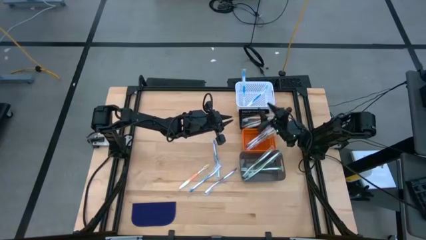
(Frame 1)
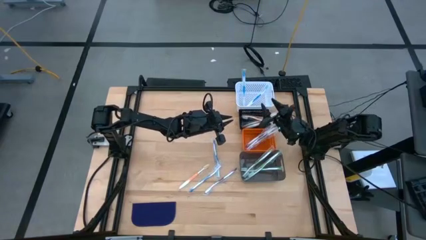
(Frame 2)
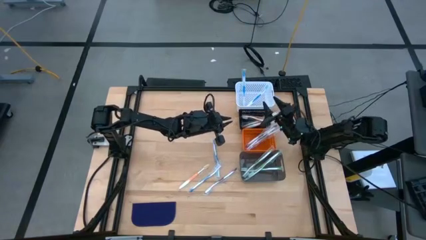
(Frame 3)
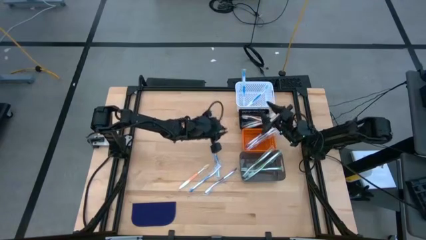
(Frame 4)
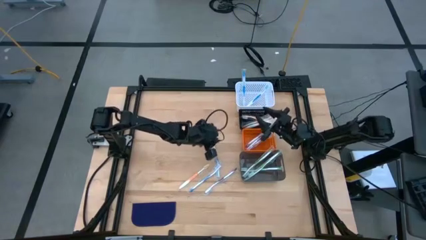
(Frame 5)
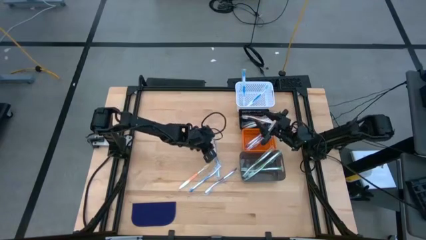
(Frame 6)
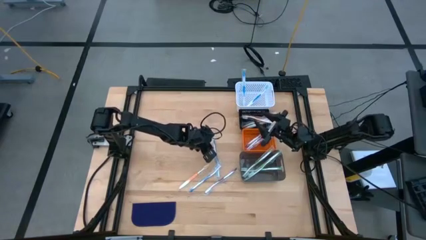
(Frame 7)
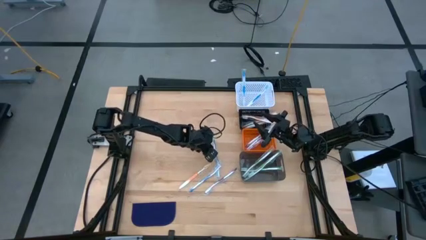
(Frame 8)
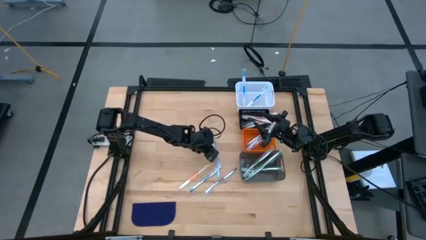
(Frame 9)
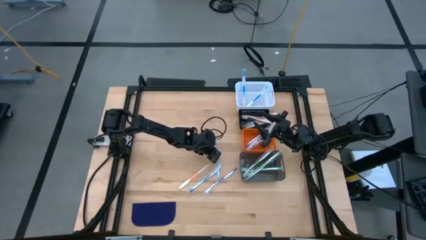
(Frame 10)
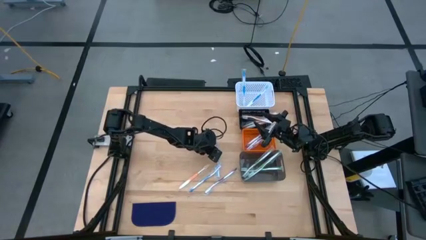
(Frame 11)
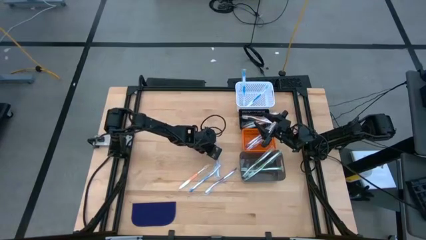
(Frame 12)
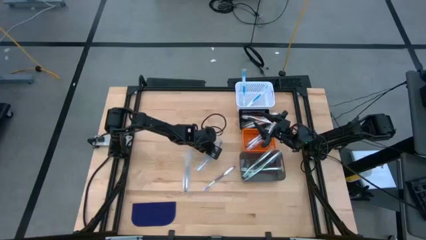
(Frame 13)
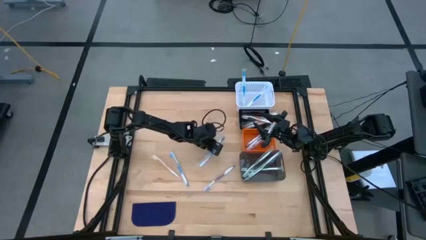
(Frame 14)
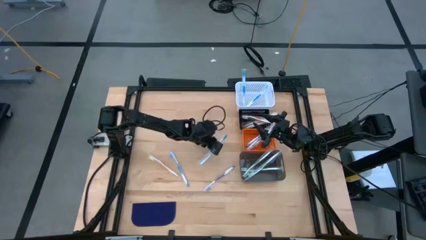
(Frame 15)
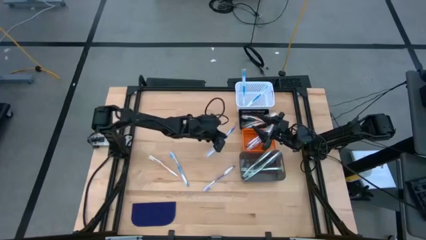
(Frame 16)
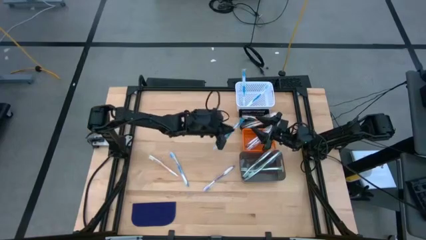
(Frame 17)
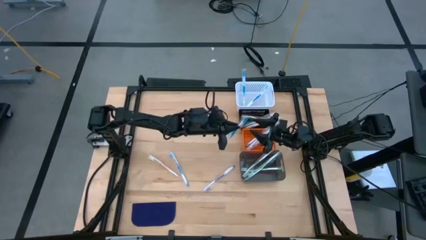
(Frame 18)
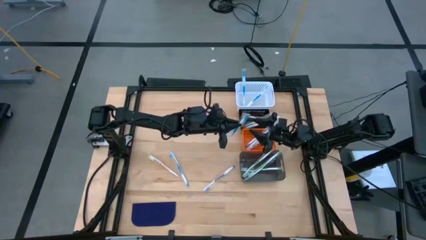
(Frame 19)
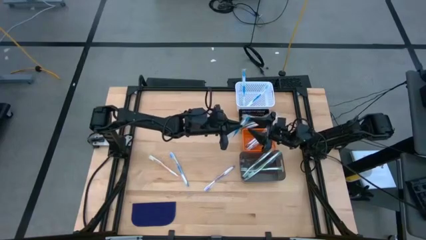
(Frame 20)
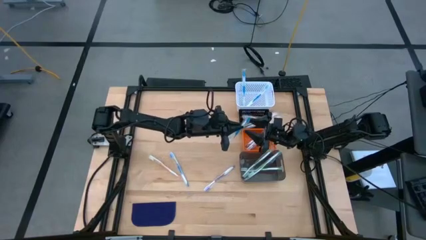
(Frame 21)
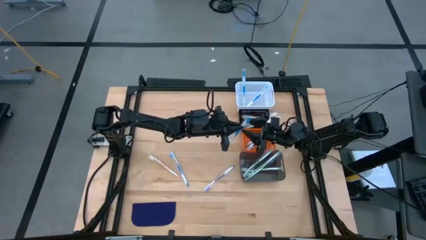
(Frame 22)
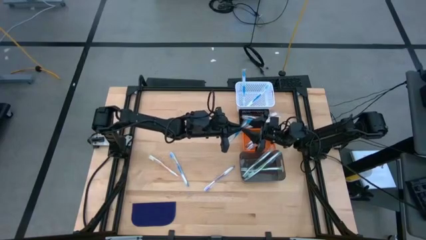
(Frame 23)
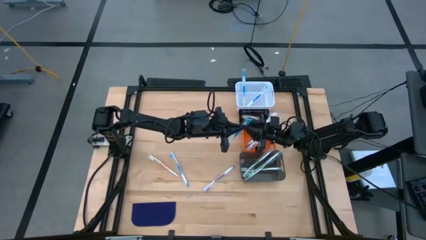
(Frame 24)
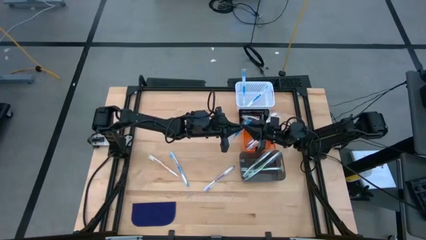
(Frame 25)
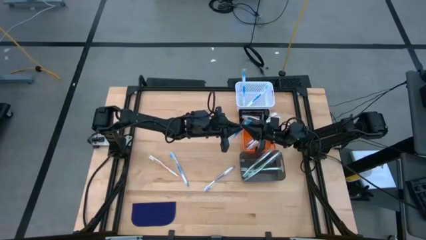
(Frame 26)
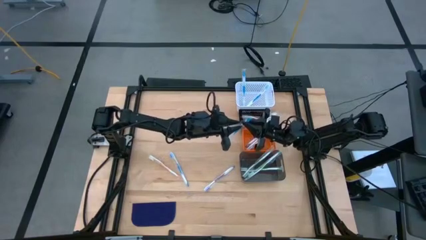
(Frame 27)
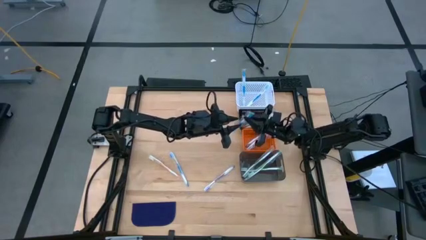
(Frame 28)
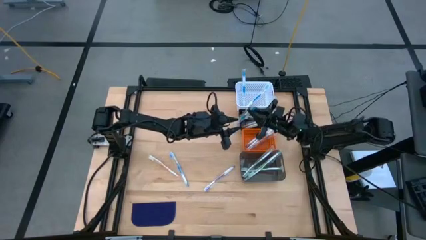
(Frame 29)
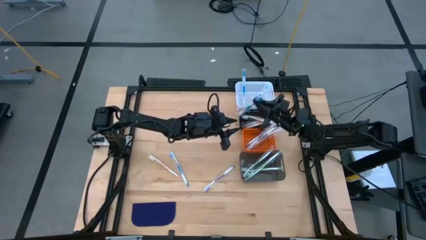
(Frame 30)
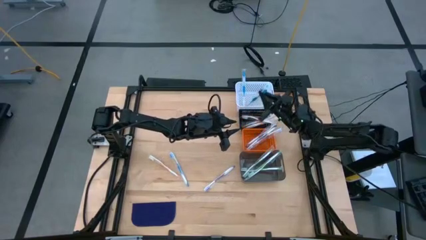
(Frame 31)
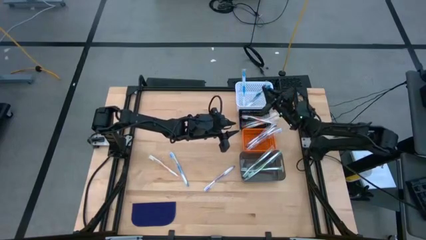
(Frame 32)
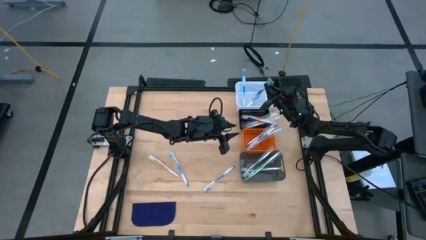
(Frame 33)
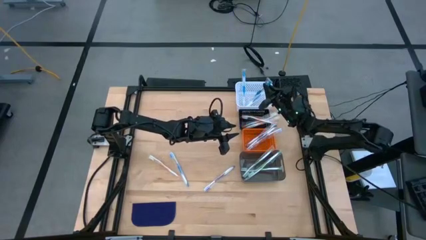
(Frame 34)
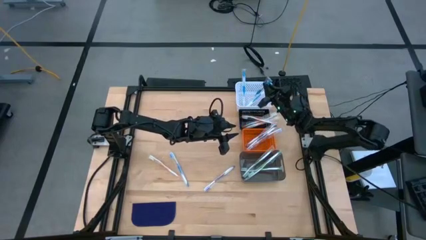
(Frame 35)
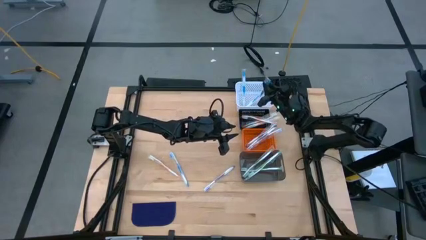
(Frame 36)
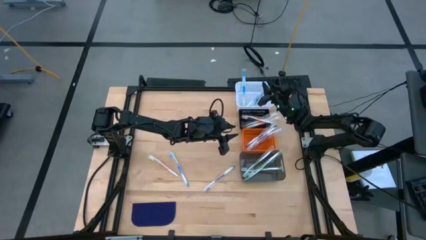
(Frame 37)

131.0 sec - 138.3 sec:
Task: Pick & Place Toothbrushes
Put the blue toothbrush into the white bin

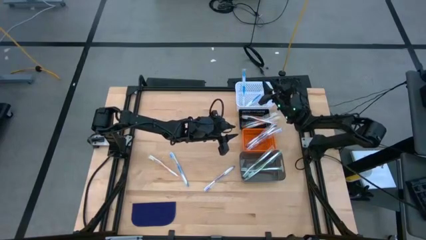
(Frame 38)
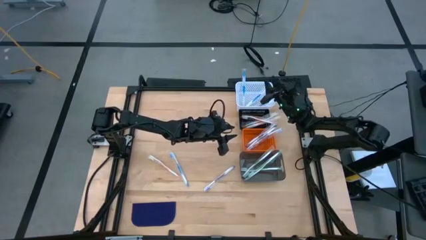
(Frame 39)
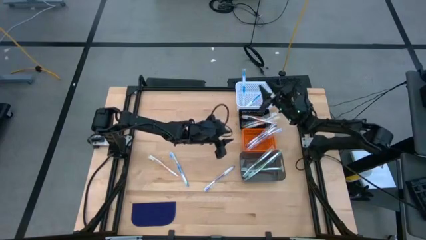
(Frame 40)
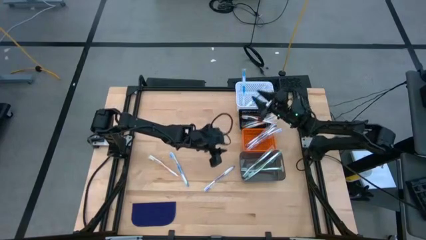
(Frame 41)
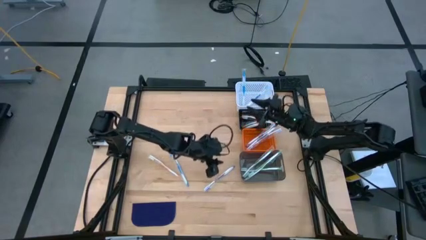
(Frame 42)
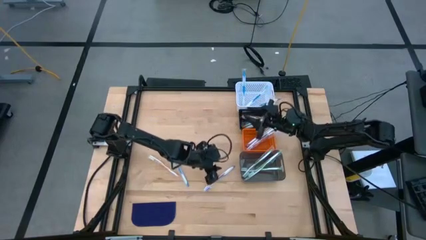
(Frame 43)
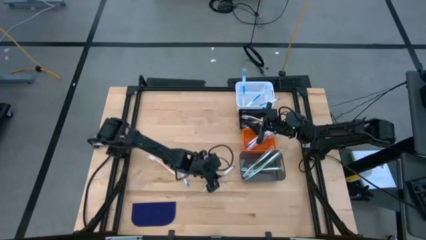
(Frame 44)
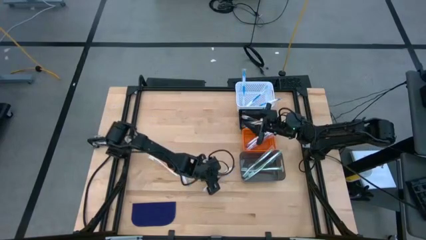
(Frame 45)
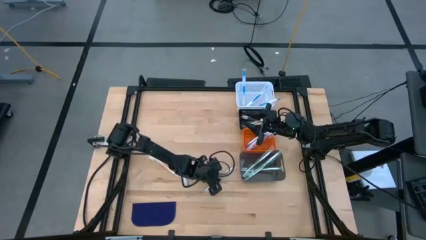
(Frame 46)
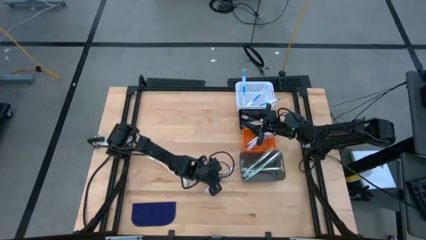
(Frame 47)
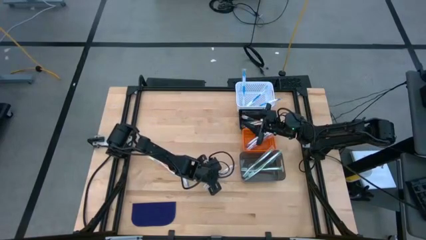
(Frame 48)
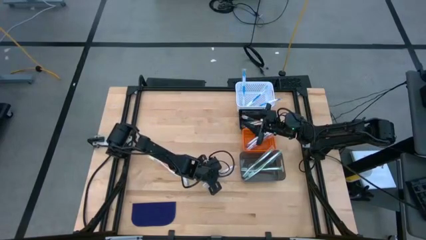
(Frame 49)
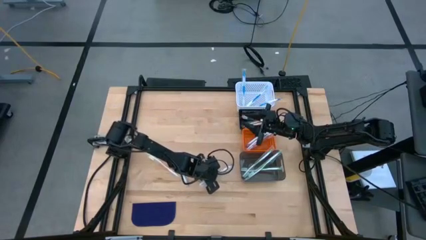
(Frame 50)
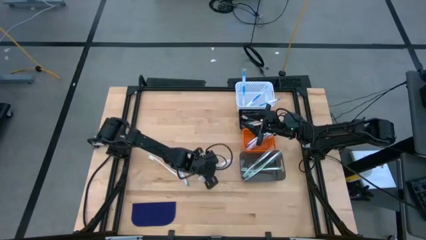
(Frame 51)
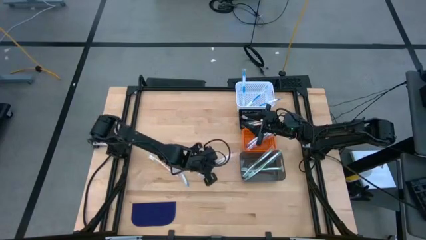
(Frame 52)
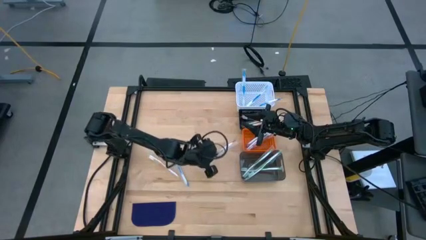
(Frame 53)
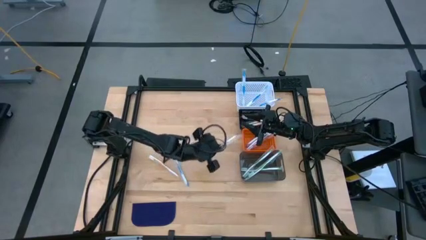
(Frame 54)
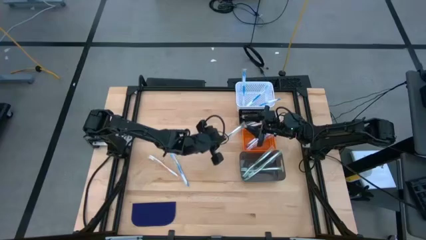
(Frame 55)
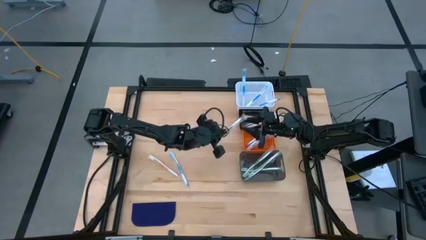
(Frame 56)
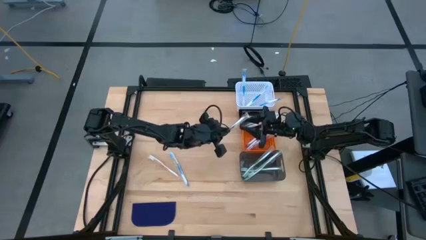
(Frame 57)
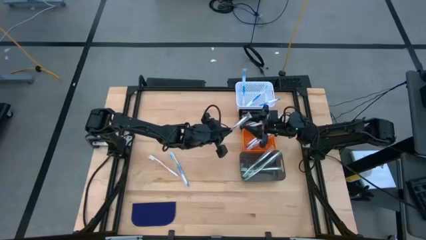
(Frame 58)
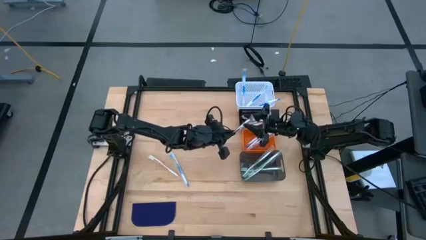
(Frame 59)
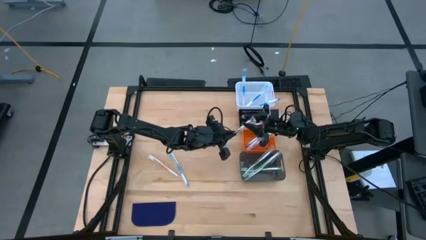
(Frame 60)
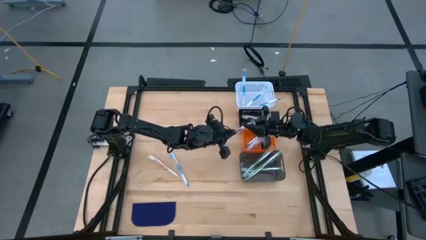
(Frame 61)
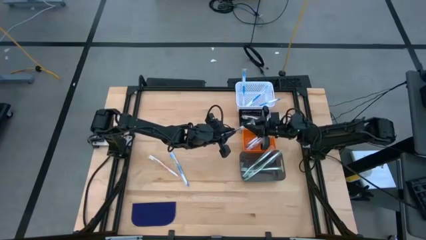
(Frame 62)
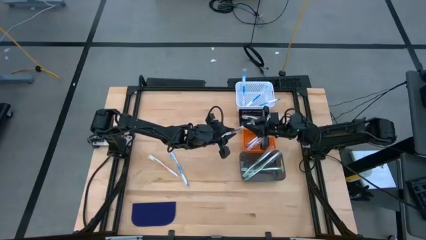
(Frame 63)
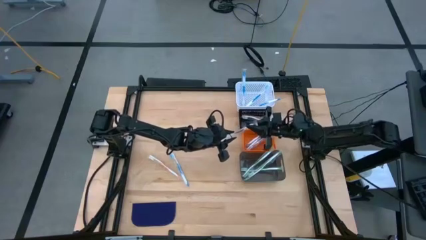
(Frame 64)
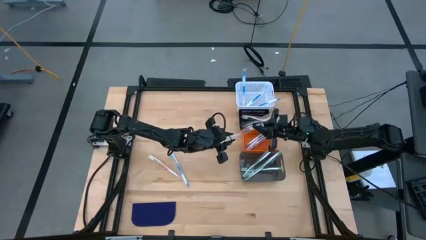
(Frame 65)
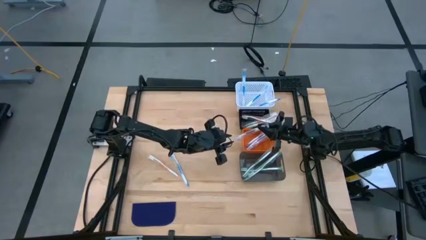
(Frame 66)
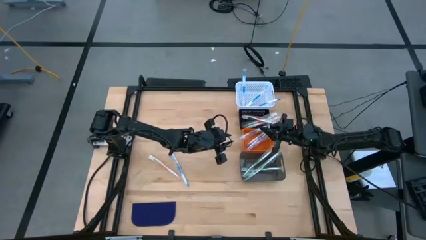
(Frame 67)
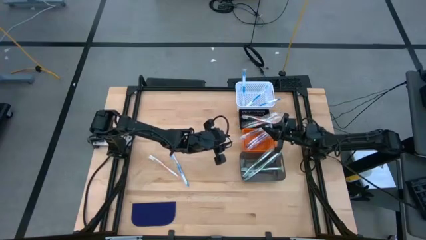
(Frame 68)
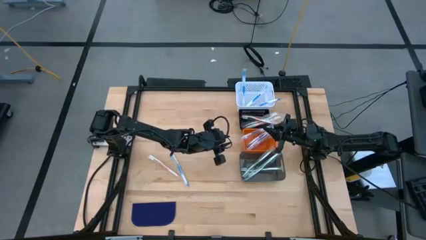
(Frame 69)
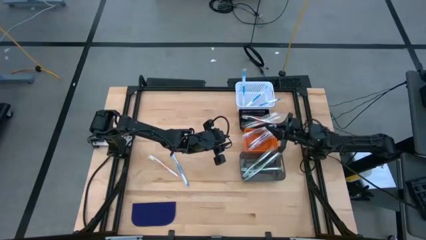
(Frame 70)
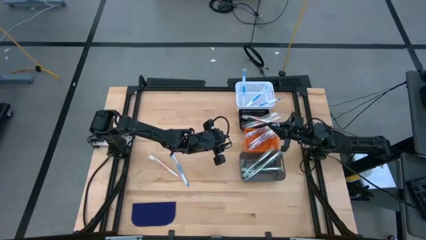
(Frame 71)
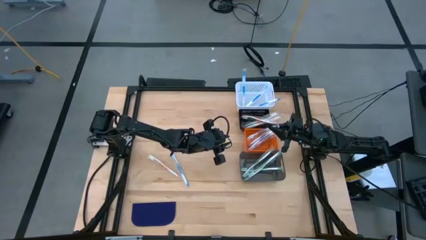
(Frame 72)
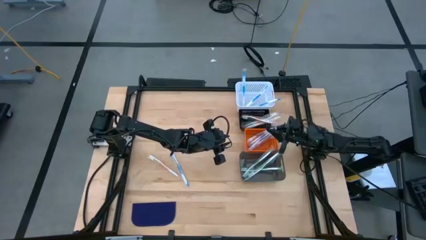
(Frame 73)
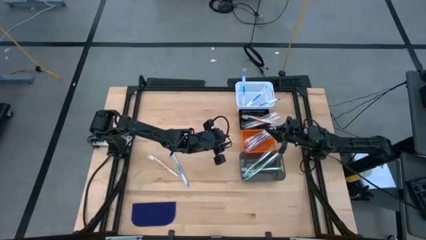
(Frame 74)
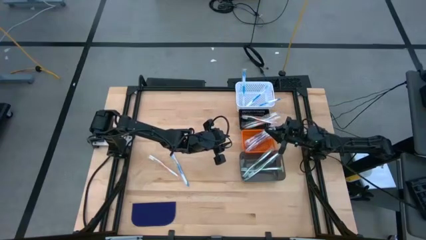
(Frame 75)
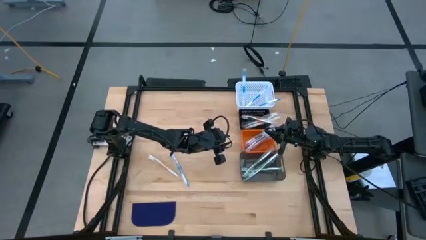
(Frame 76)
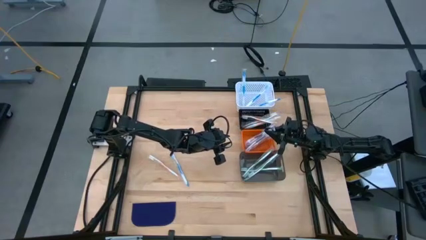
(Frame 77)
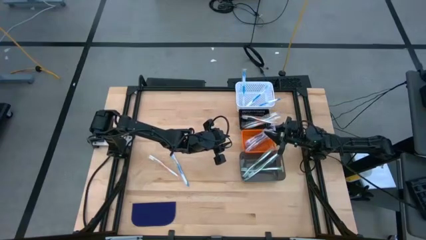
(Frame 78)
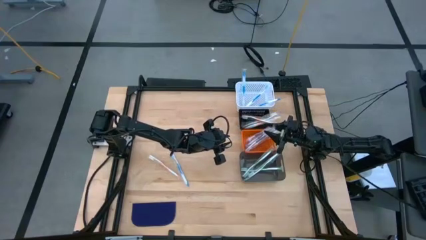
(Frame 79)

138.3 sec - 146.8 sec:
Put the purple toothbrush into the orange bin

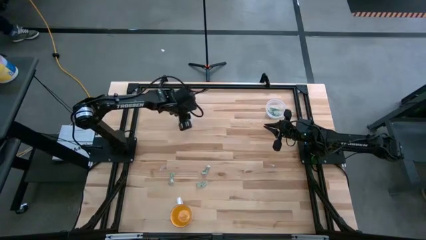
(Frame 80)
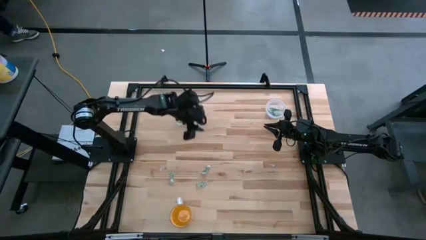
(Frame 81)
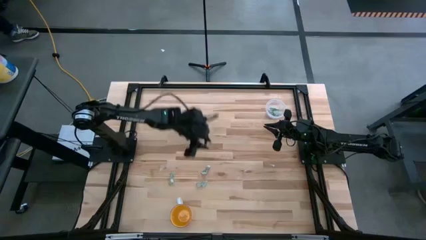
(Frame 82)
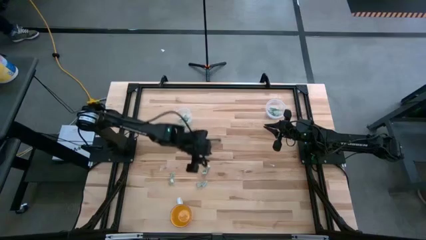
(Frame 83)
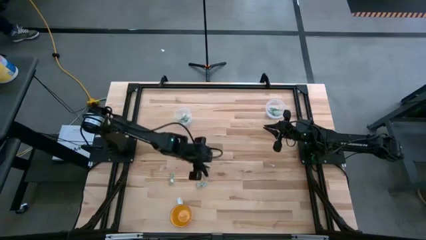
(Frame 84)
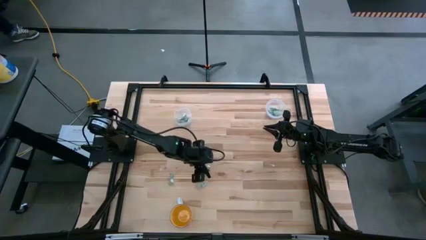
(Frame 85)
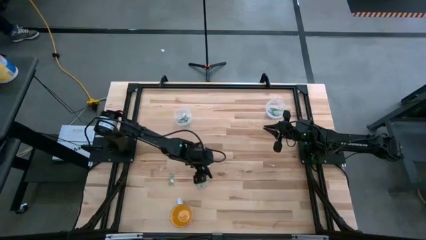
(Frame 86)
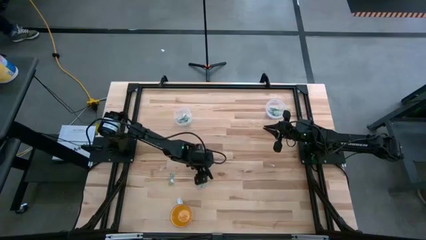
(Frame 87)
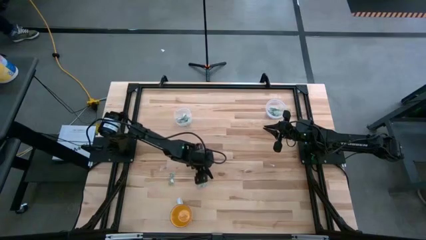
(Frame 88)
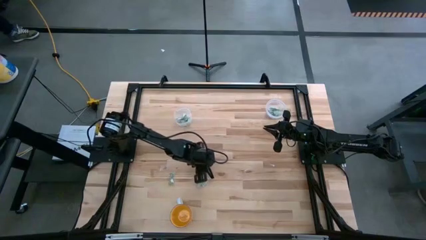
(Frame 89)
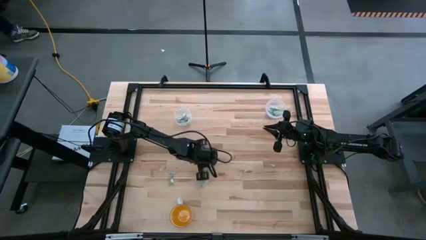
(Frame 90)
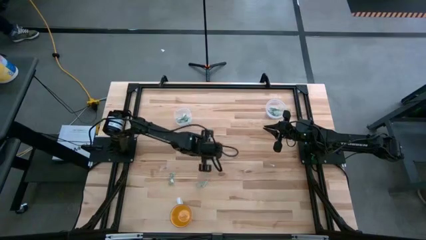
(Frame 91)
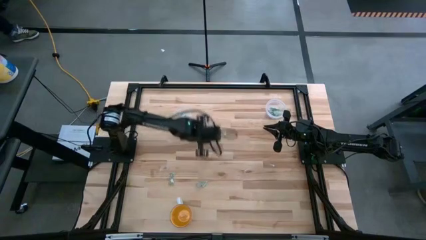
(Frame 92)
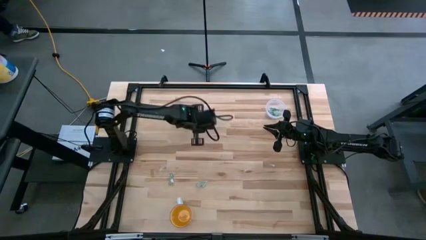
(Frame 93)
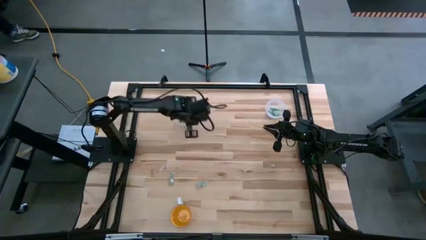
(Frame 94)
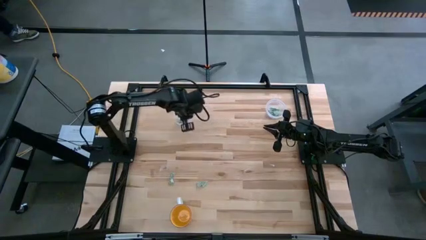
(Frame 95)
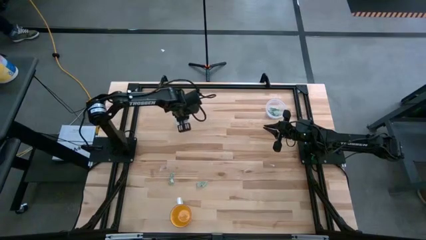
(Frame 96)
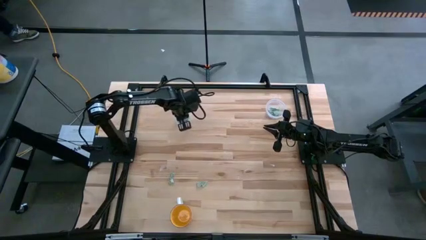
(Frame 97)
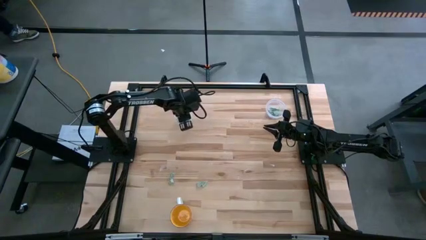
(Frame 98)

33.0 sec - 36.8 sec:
Task: Pick and place items into bin
Put the stevia packet into the left transparent bin
